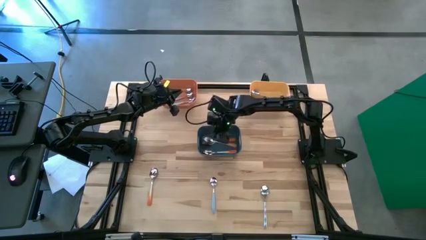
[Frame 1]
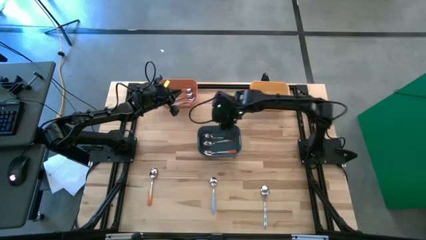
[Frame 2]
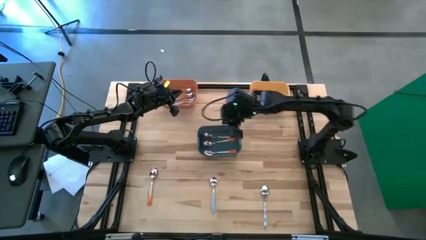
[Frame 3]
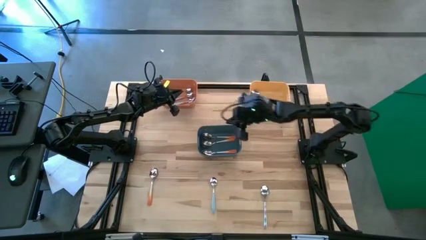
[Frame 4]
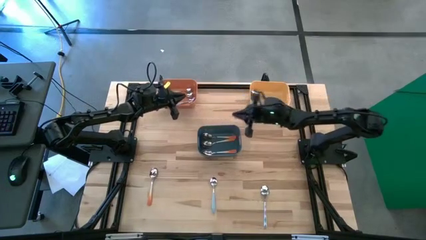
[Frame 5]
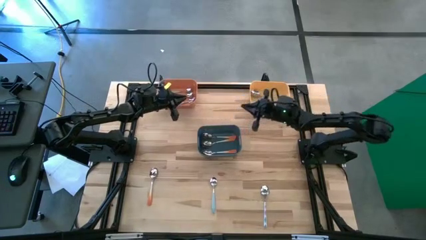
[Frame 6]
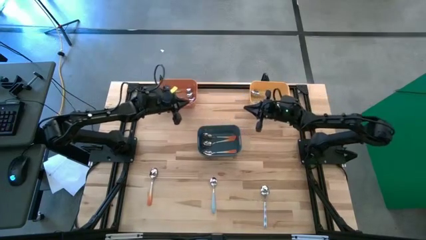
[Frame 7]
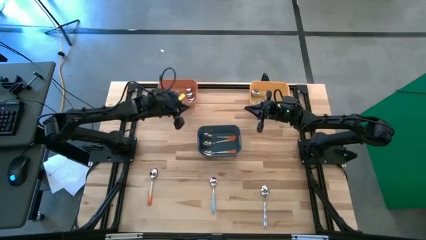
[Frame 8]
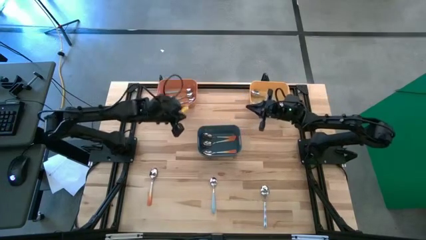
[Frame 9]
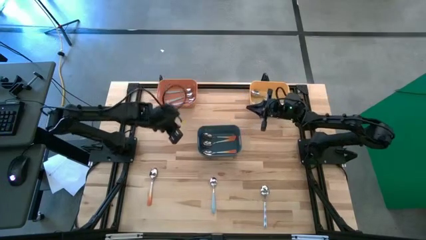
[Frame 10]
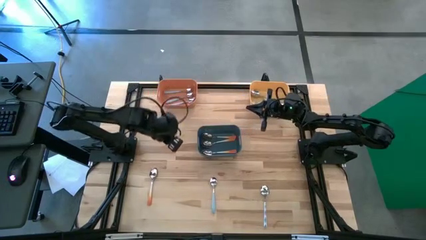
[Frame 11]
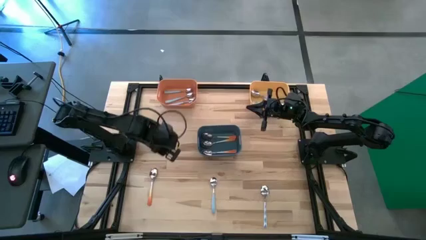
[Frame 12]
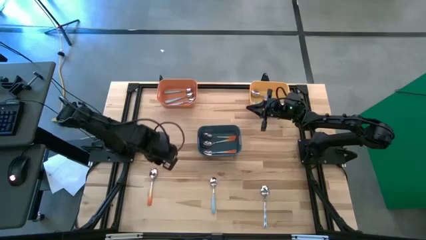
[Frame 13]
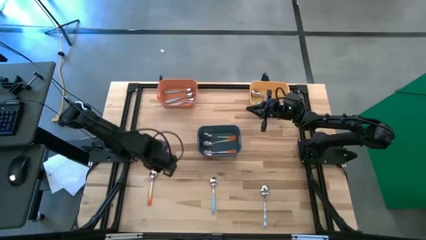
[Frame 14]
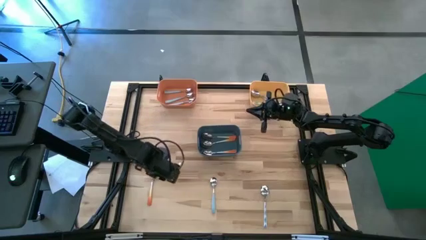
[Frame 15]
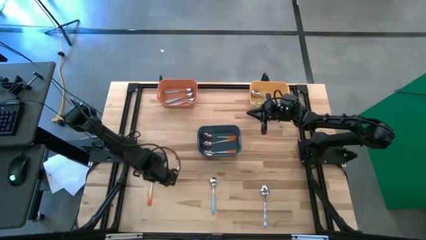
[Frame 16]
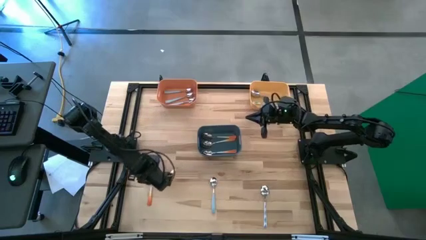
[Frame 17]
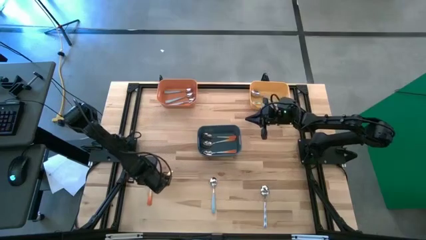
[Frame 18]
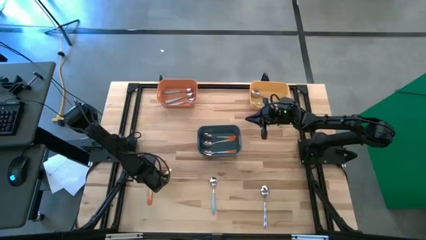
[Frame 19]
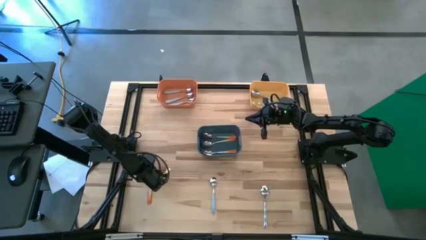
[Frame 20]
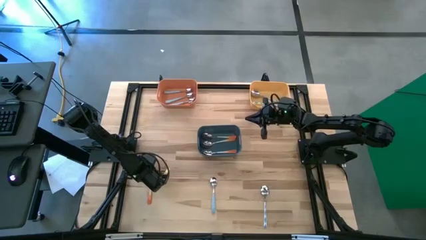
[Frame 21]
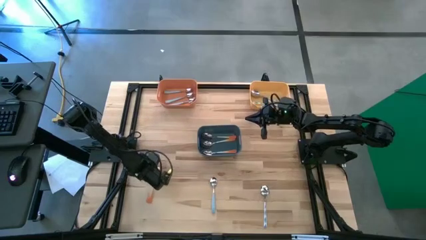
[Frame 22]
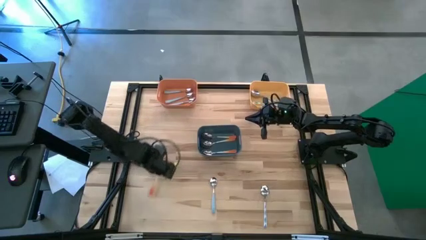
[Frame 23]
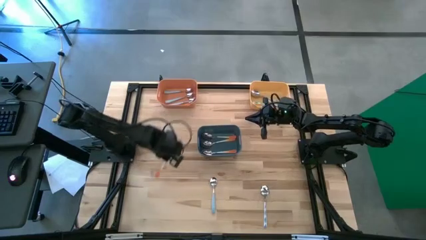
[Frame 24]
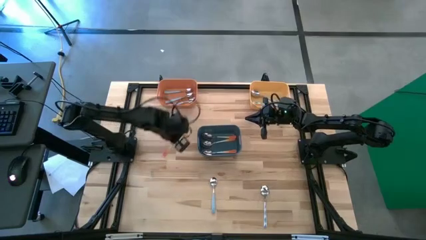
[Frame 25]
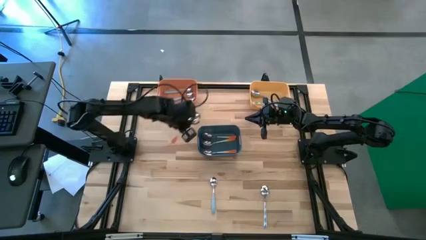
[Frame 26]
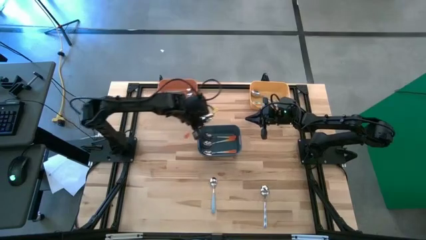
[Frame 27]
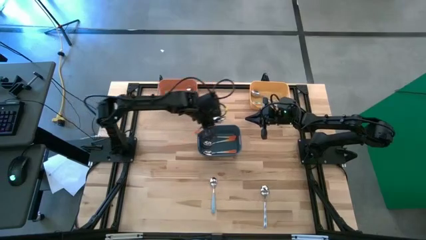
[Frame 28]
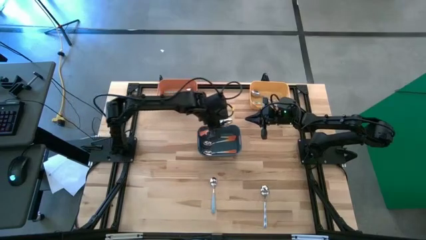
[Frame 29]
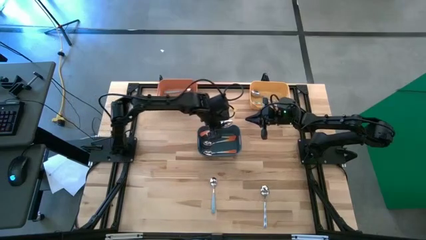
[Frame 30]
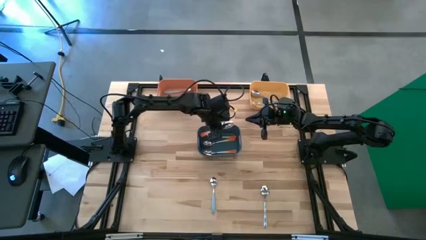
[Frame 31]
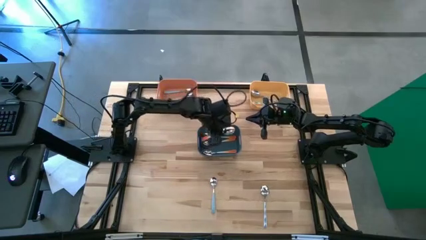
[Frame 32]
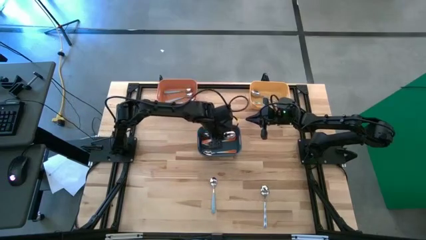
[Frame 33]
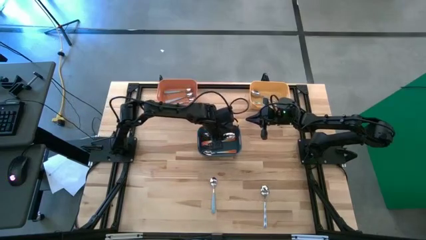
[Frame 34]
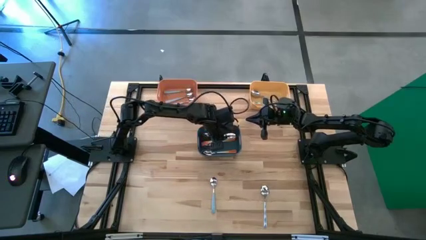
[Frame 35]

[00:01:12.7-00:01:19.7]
Task: Sort silverware by color (type)
Put the orange spoon into the blue bin

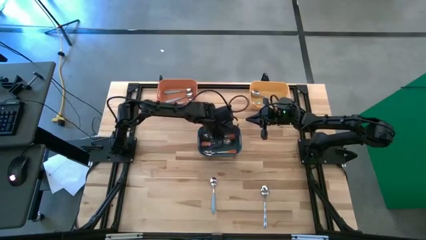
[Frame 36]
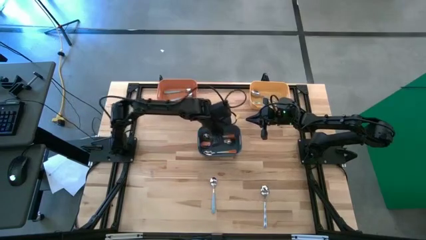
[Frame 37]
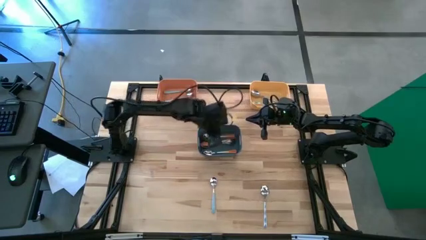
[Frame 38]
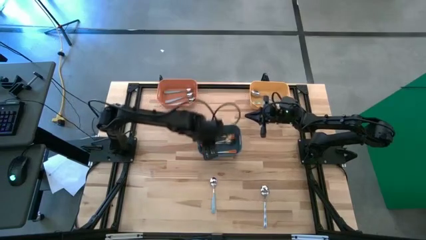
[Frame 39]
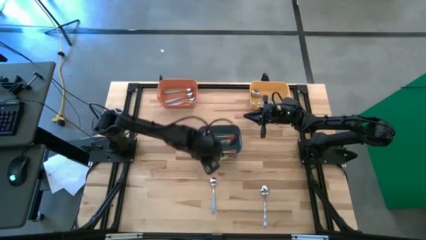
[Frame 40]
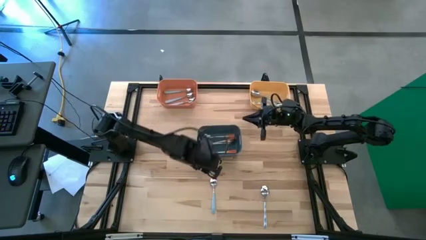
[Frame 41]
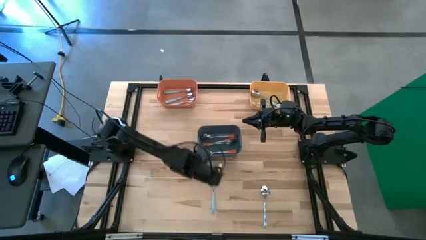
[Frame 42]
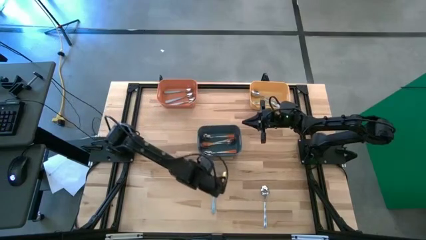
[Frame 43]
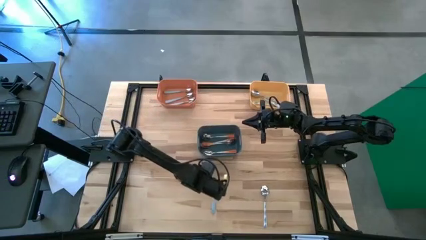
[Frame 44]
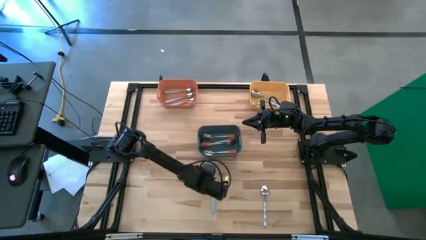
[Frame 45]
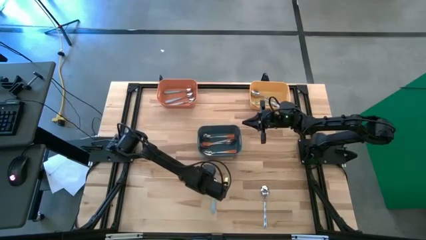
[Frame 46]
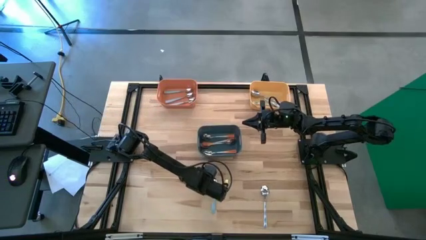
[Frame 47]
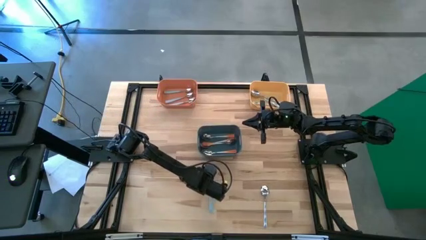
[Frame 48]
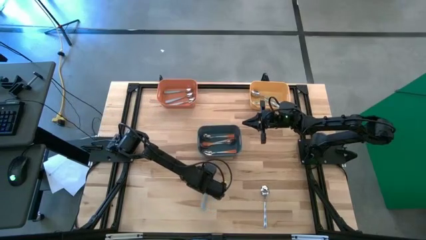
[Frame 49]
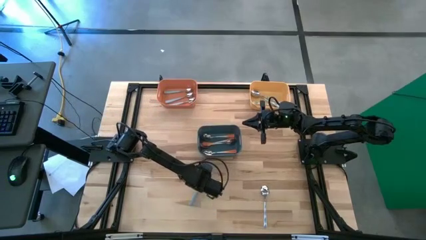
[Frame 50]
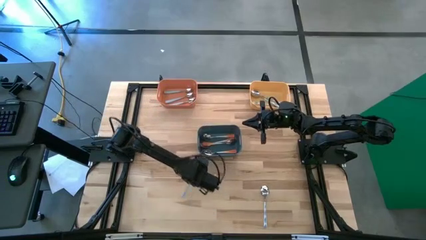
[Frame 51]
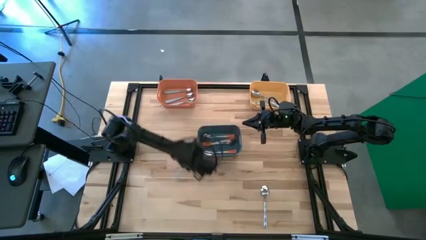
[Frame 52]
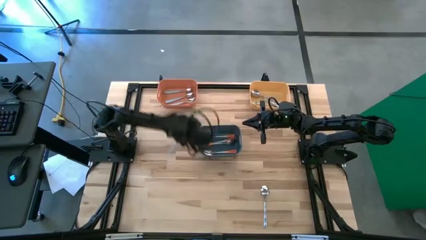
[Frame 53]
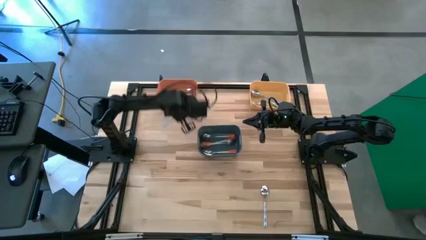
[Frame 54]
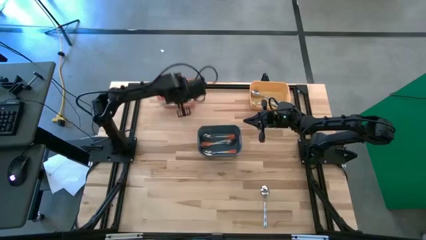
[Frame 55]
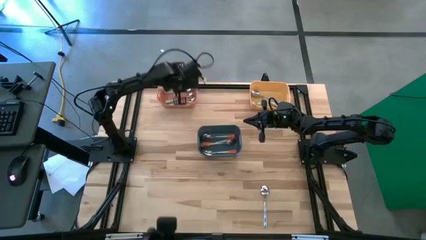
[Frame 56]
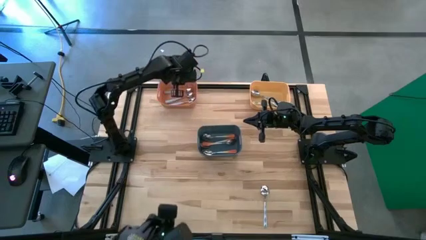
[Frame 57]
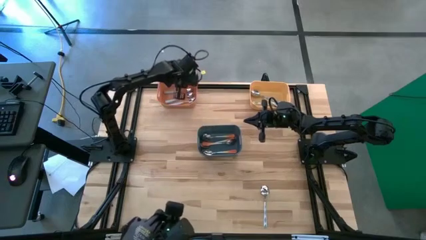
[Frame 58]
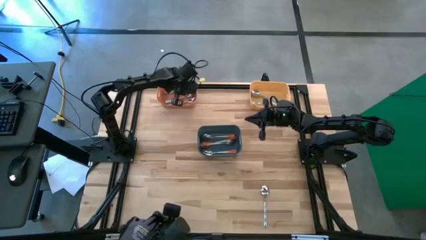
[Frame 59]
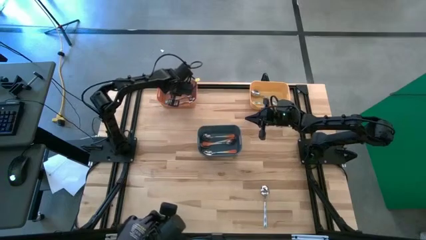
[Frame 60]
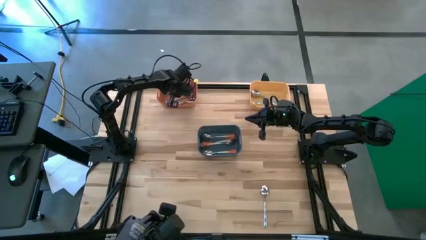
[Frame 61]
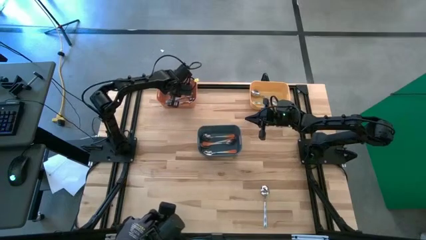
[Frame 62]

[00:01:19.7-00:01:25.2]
Put the blue spoon into the orange bin

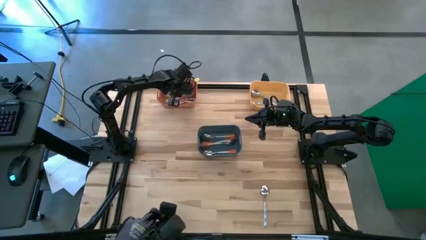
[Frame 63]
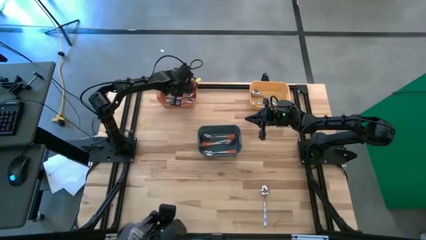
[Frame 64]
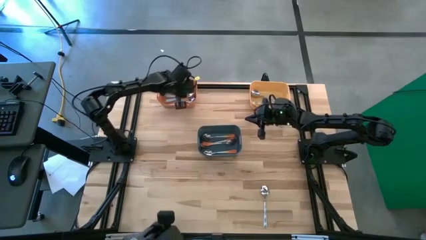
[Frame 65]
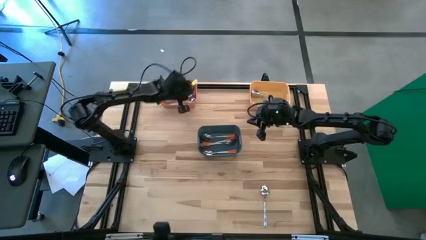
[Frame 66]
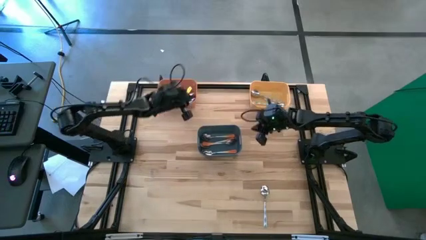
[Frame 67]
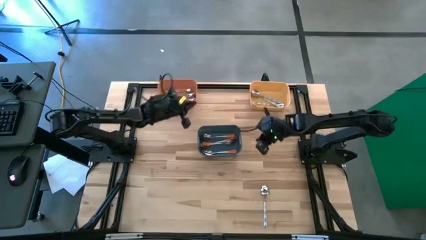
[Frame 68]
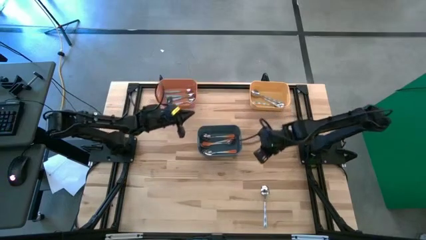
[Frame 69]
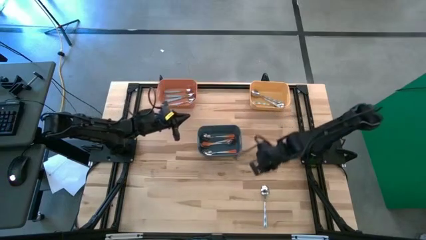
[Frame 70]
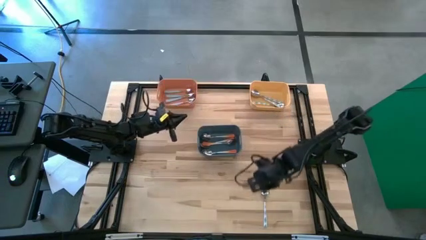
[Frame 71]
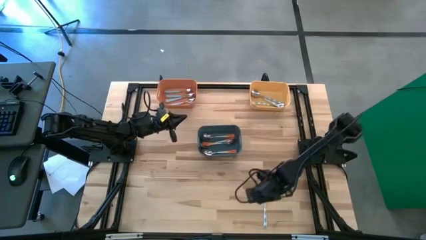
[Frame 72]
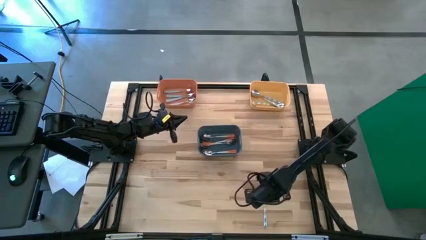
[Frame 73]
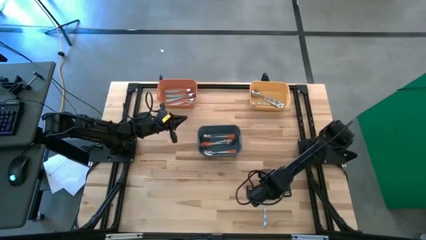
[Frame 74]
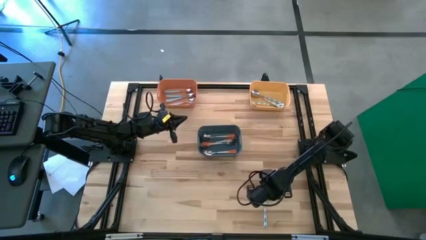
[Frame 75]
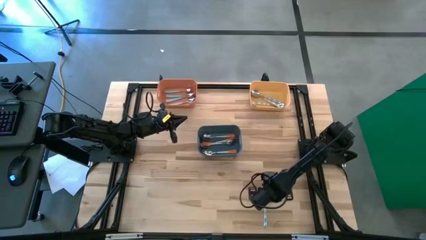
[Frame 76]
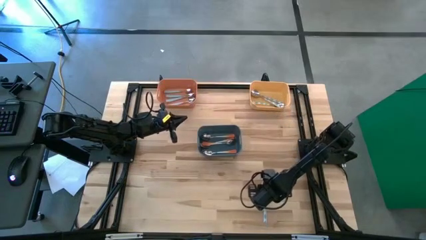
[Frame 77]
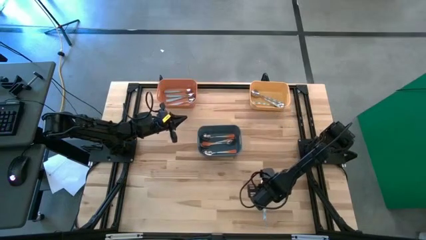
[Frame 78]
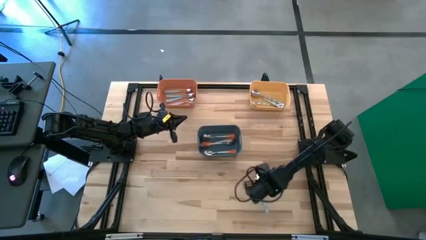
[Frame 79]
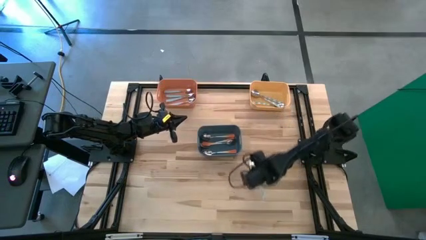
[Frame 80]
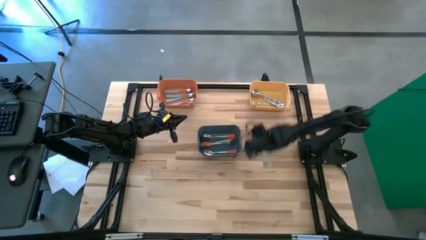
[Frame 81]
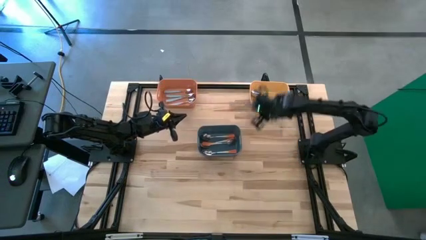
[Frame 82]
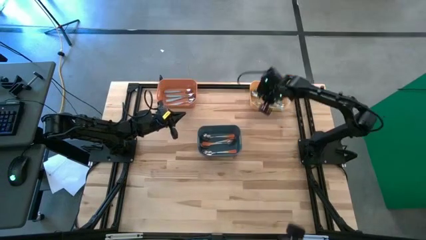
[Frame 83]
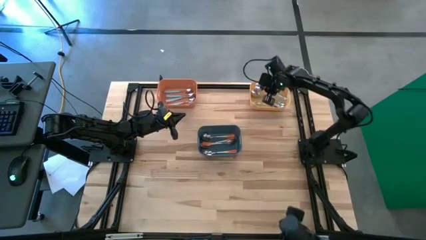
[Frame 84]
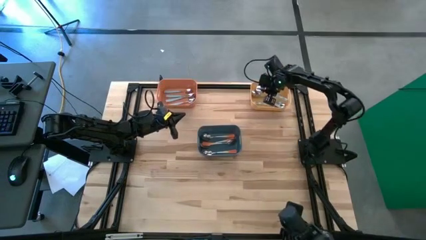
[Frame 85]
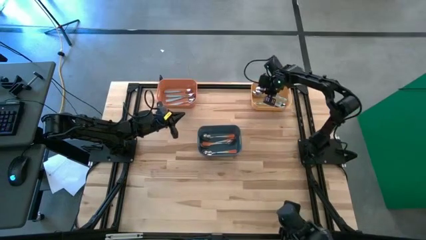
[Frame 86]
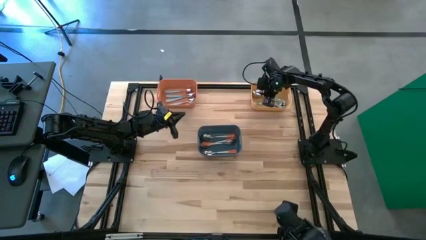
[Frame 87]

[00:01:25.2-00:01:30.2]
Put the white-blue spoon into the yellow bin
